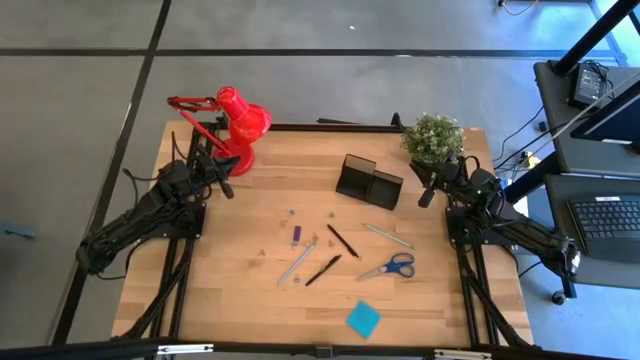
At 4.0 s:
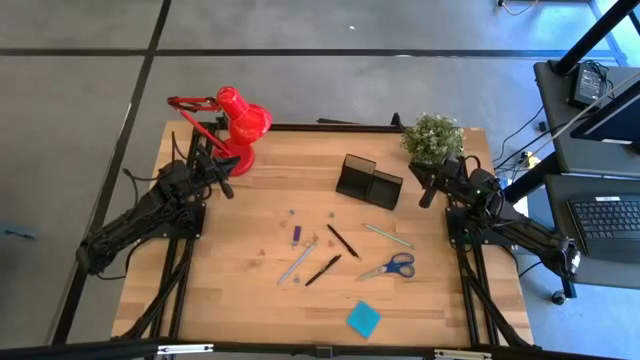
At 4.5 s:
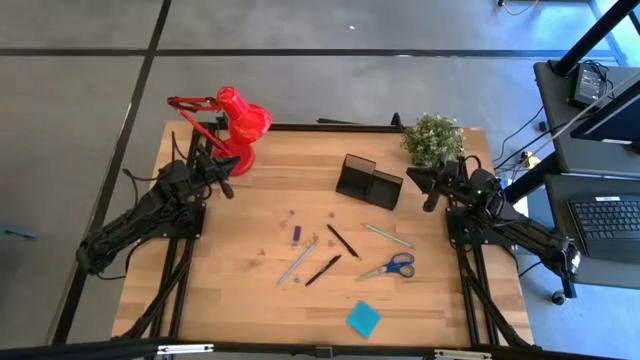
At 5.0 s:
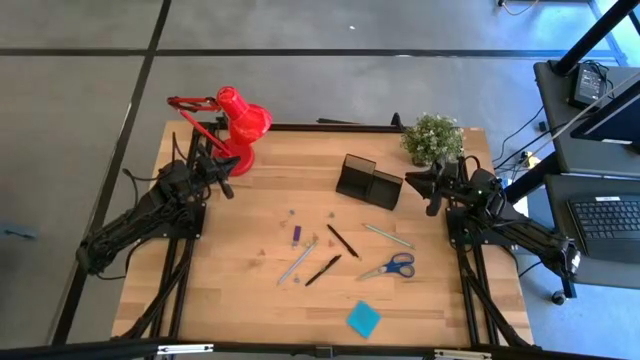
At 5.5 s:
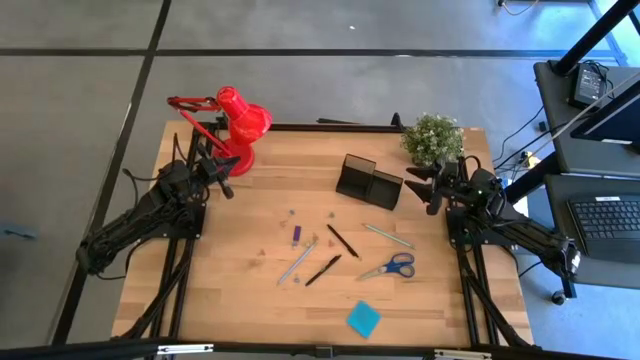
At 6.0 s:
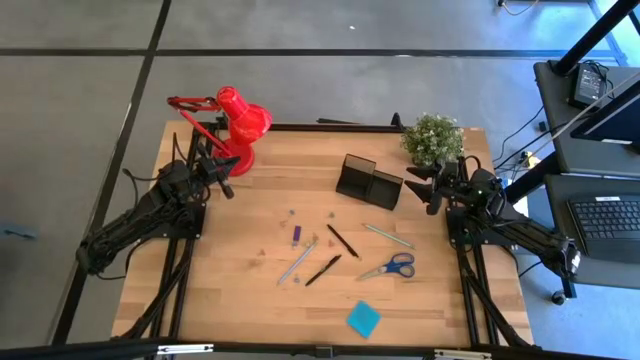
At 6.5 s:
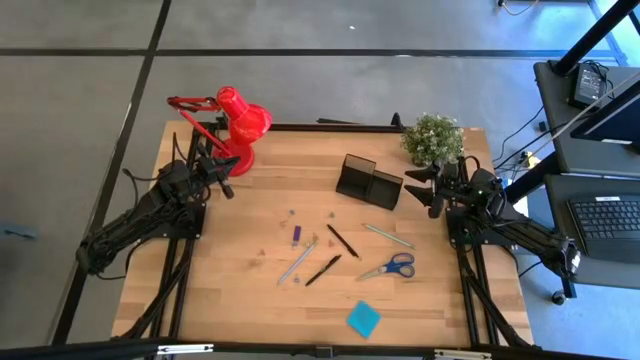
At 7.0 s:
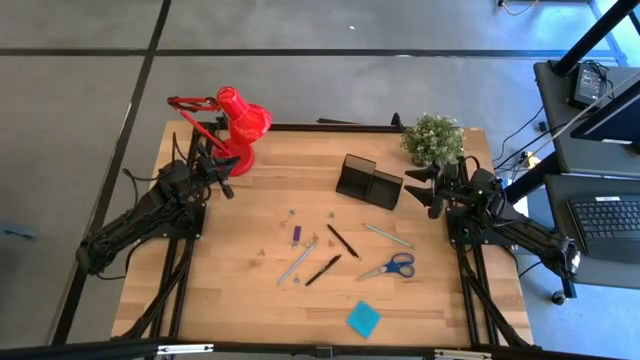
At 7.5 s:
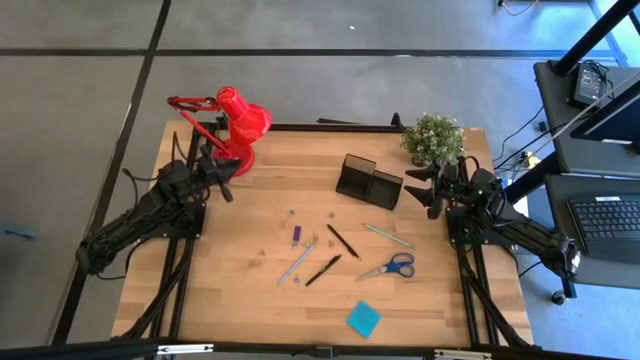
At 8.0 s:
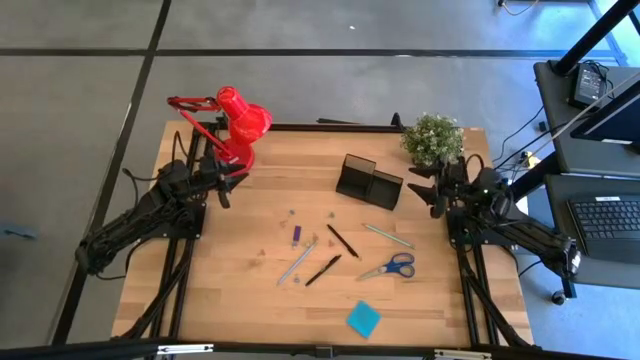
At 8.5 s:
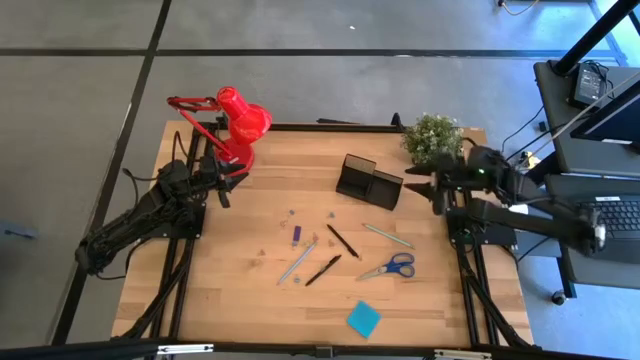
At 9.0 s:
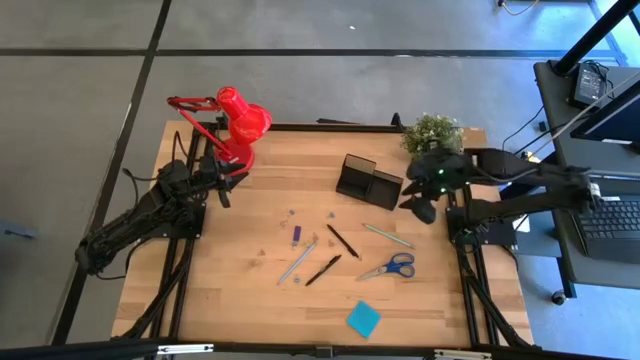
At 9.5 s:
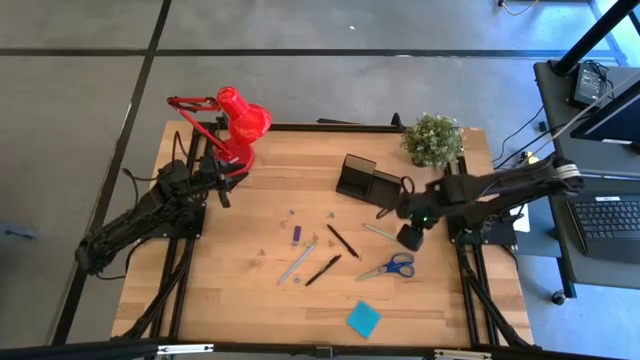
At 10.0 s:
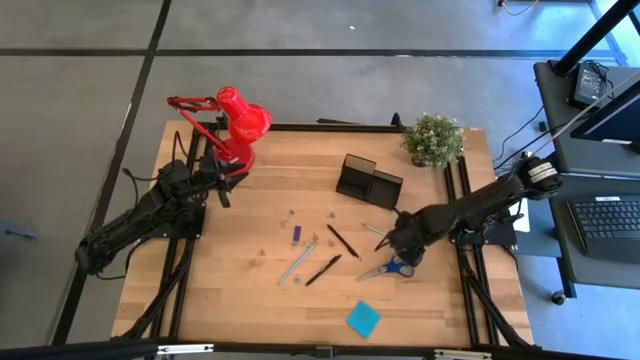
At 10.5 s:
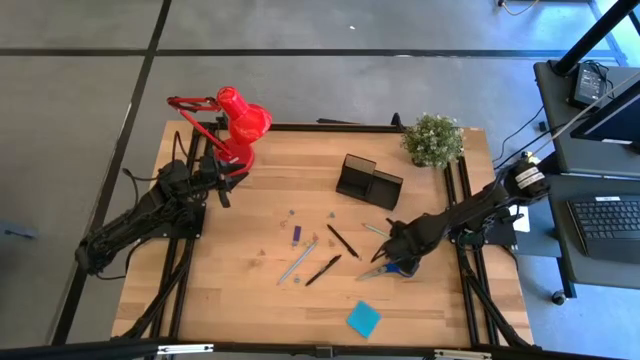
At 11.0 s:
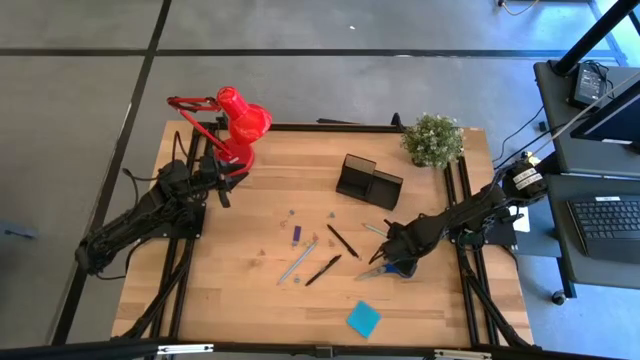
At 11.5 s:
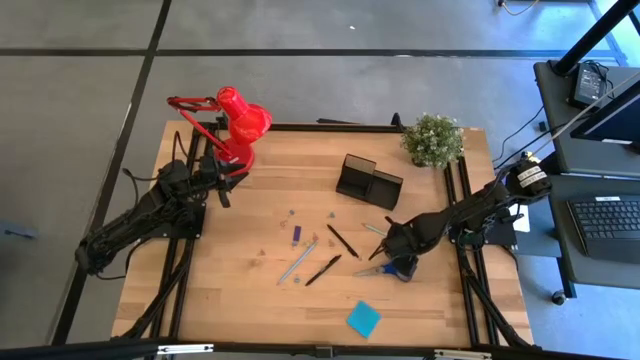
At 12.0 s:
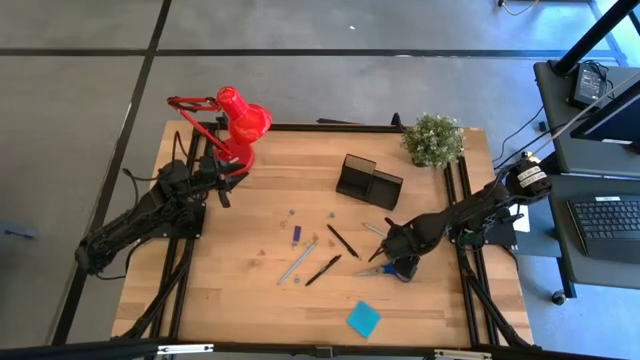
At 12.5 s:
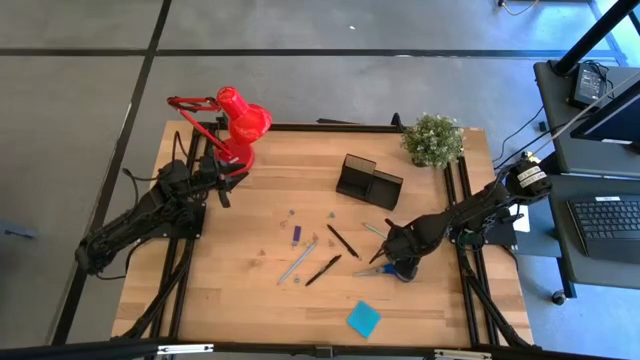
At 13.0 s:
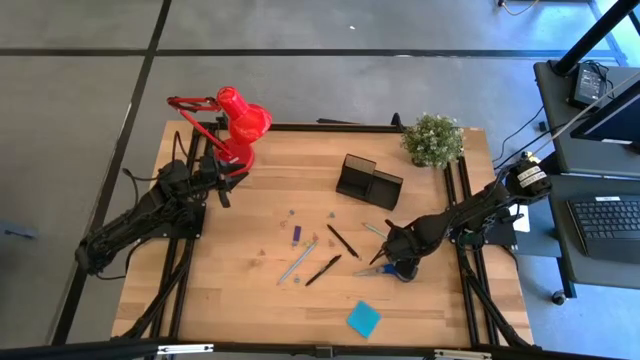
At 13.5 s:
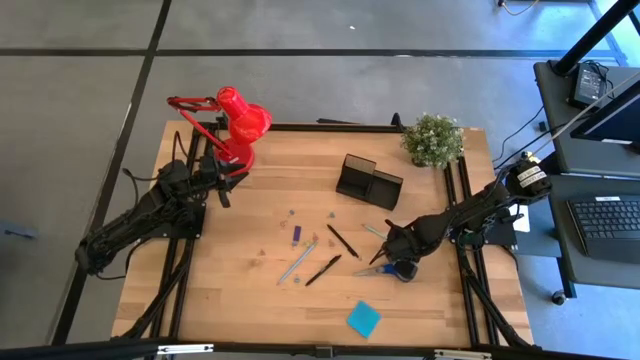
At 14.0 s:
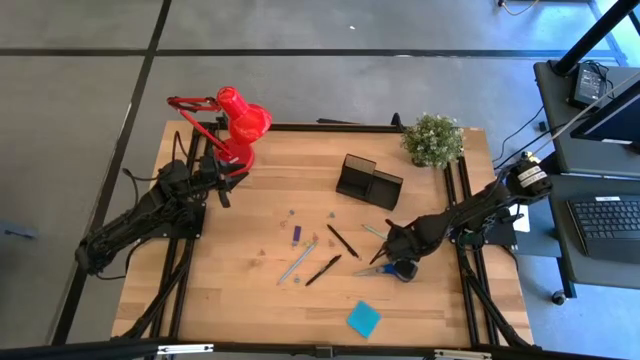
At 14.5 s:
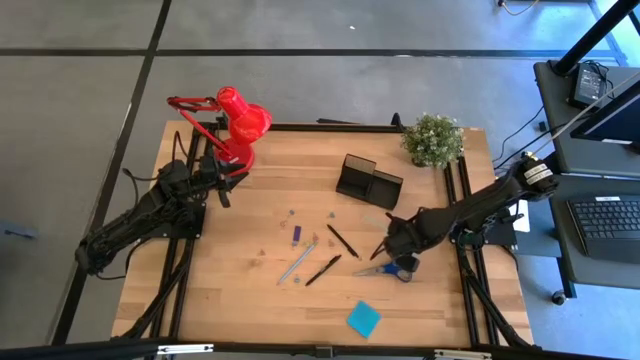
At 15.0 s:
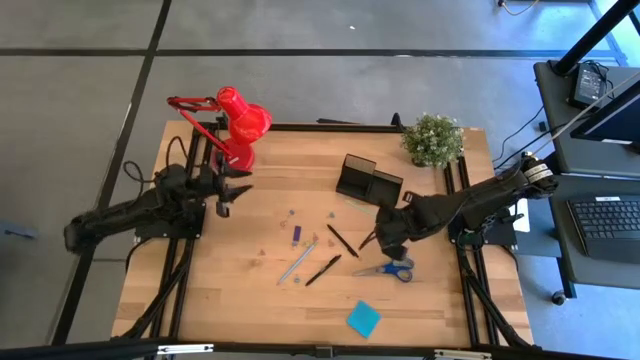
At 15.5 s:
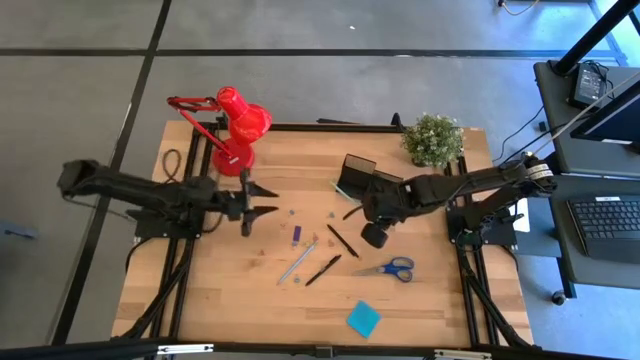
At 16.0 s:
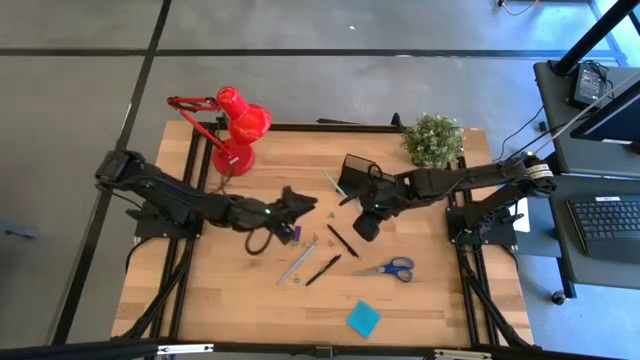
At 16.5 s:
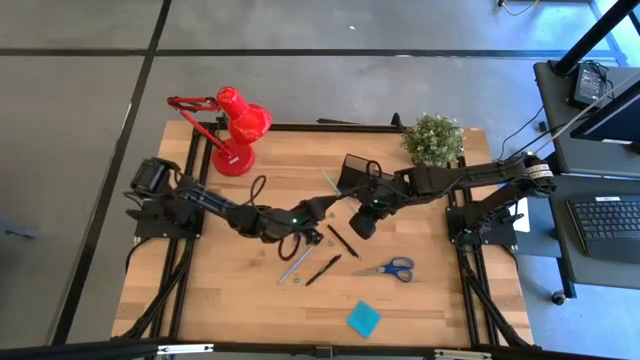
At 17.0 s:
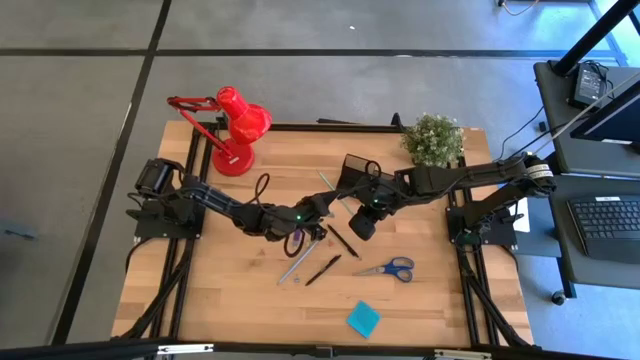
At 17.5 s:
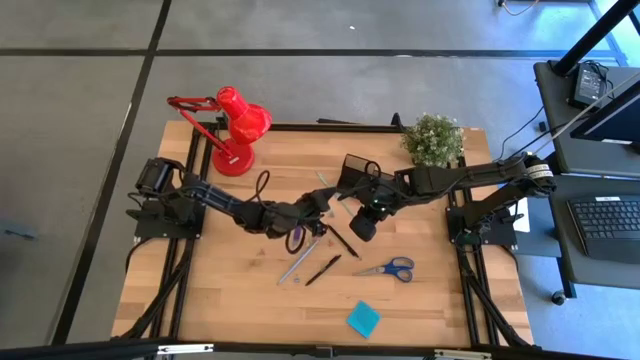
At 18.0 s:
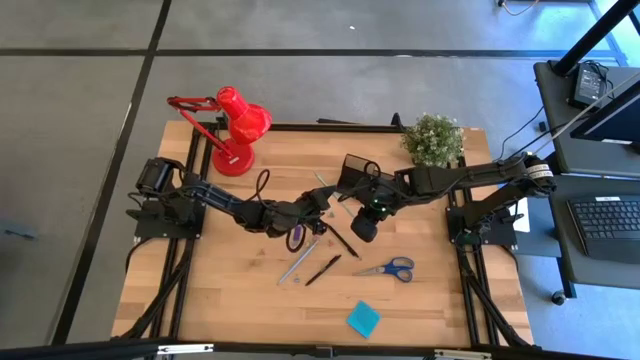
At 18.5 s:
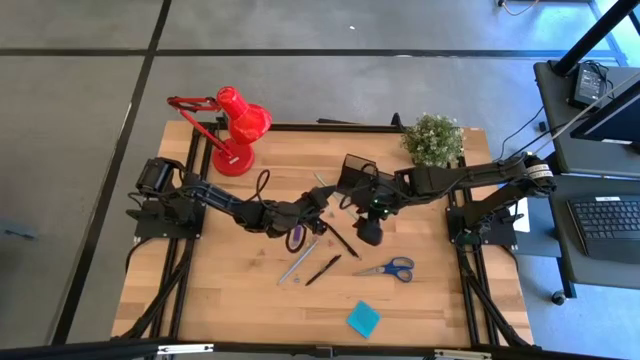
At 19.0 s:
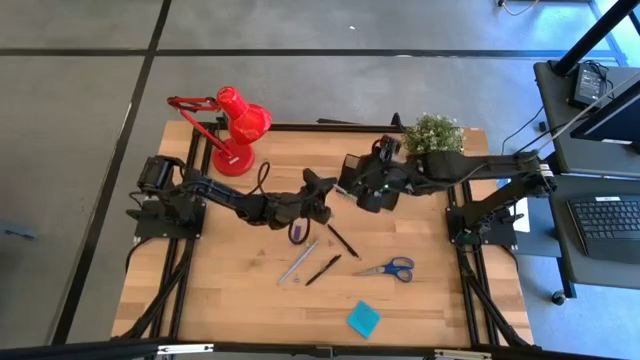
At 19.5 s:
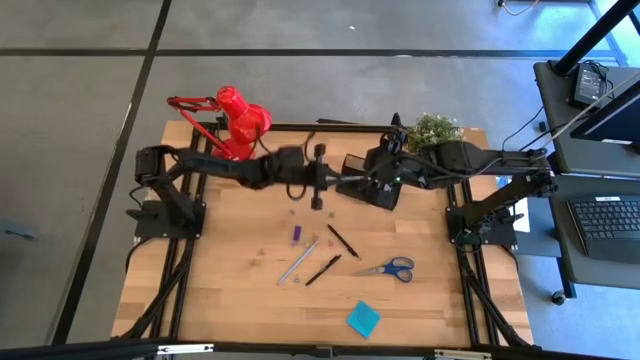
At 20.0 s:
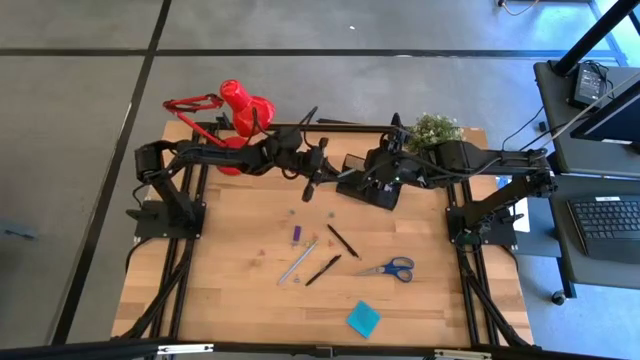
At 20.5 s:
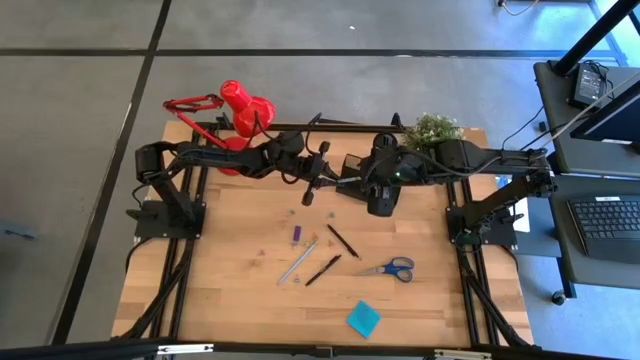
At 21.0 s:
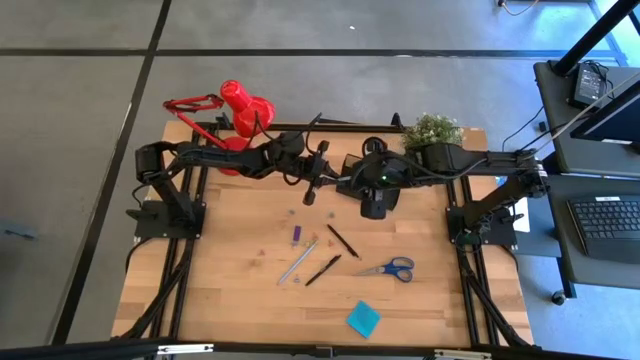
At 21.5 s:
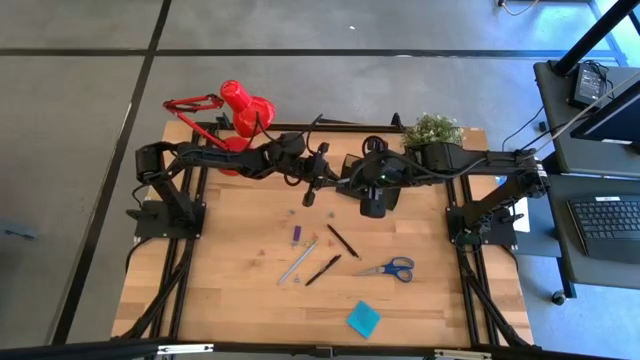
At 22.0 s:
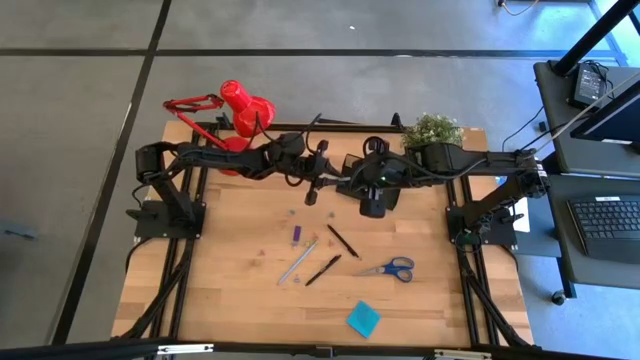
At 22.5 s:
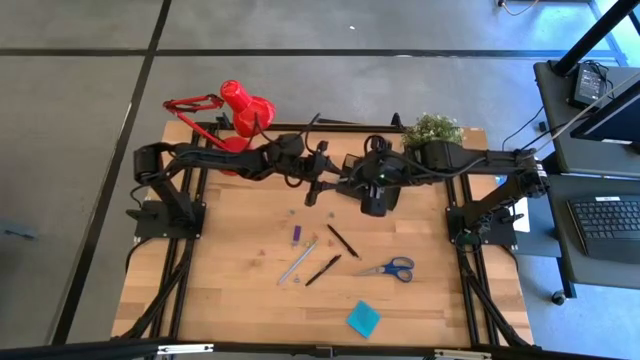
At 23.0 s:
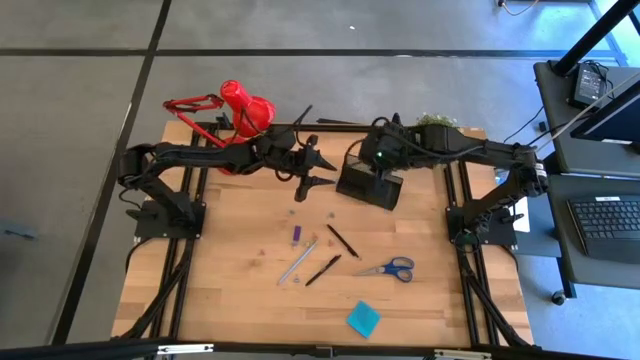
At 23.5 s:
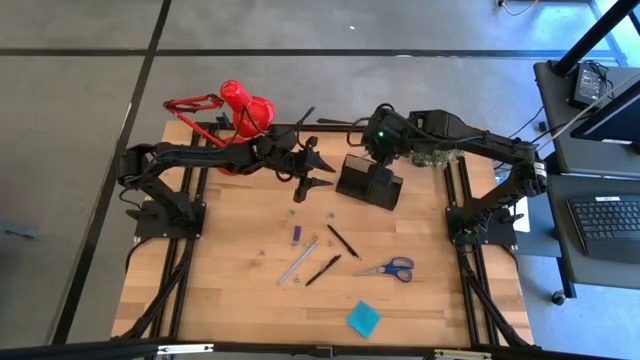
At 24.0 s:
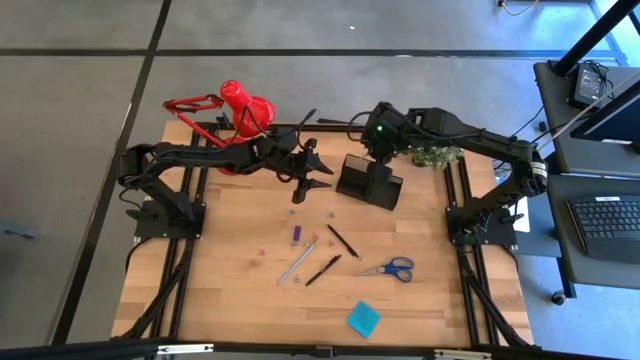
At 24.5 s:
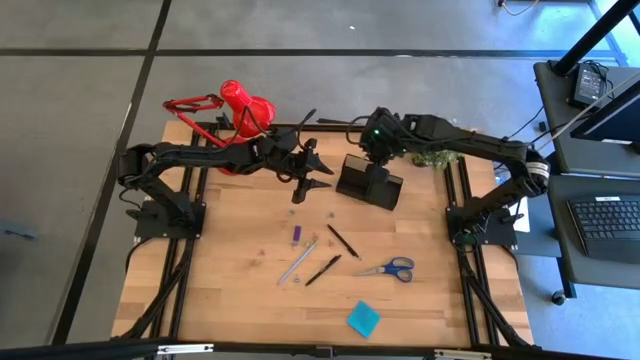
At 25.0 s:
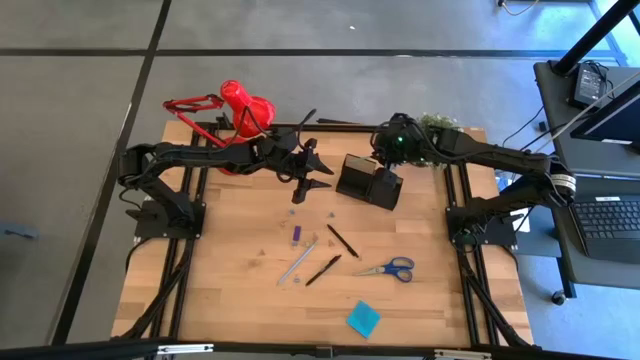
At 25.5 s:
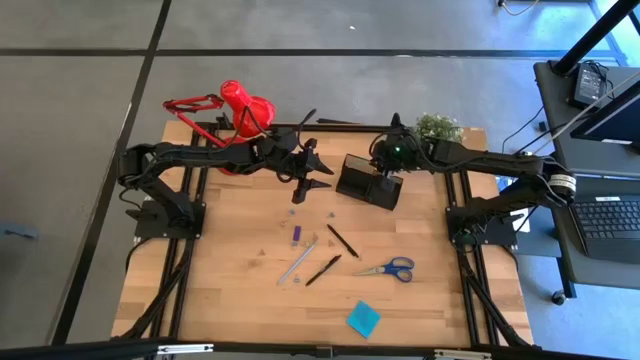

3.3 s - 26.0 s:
Task: Pick and place office supplies into organizer
Put the blue pencil into the black desk organizer
